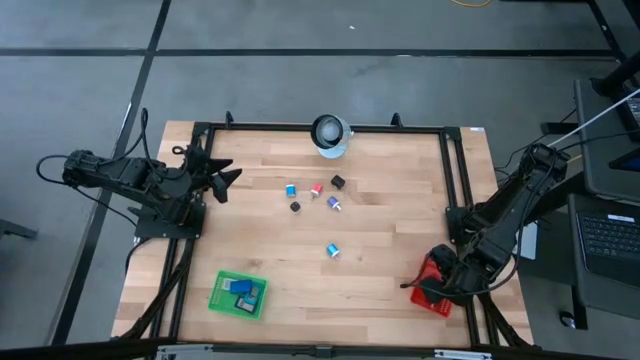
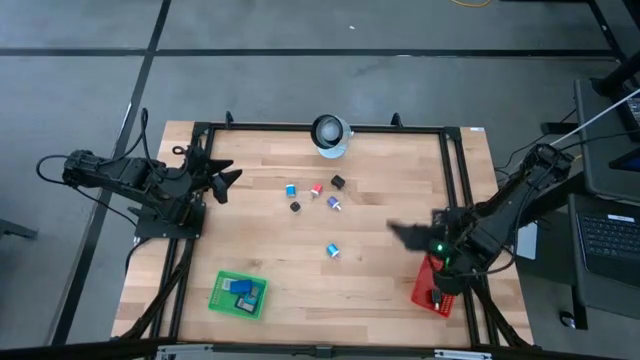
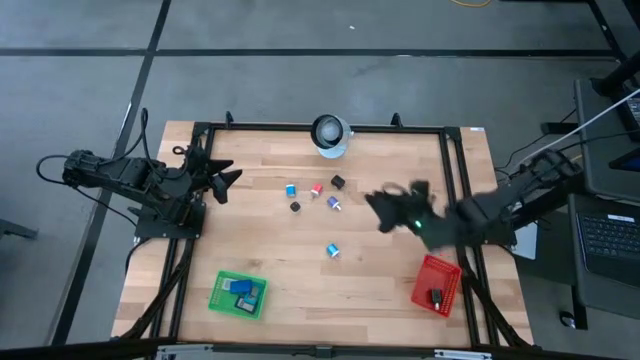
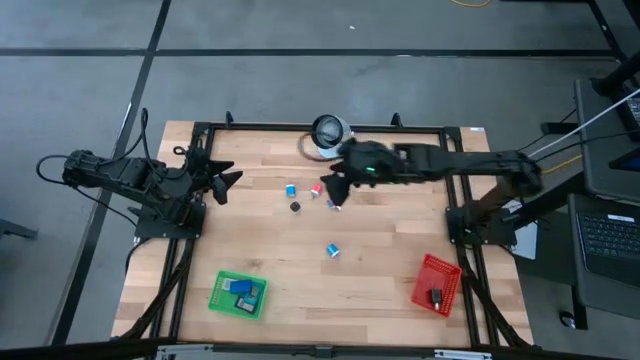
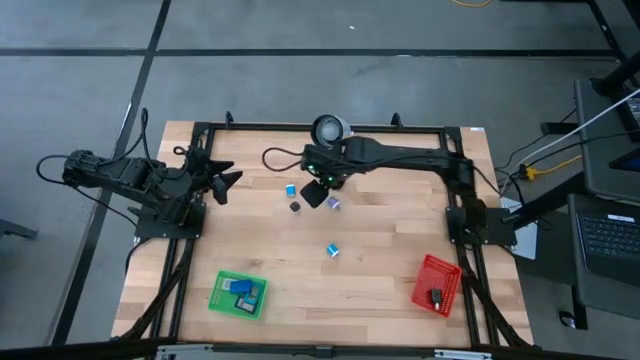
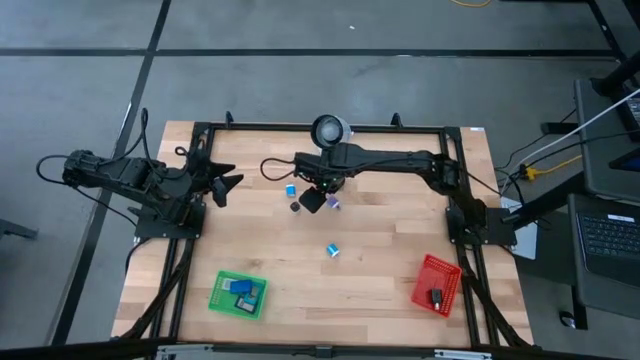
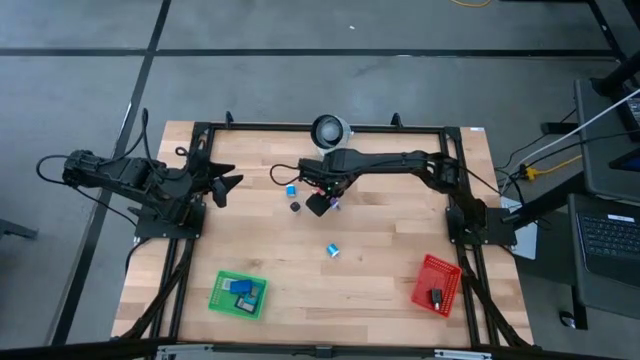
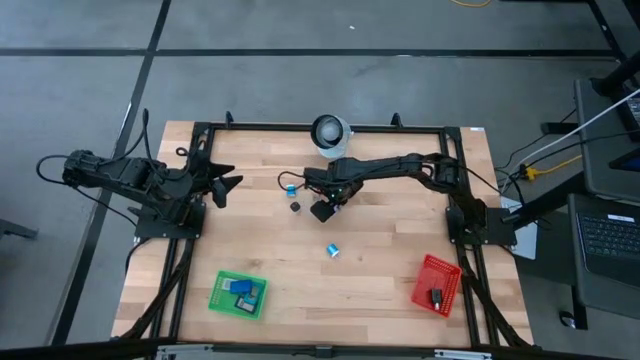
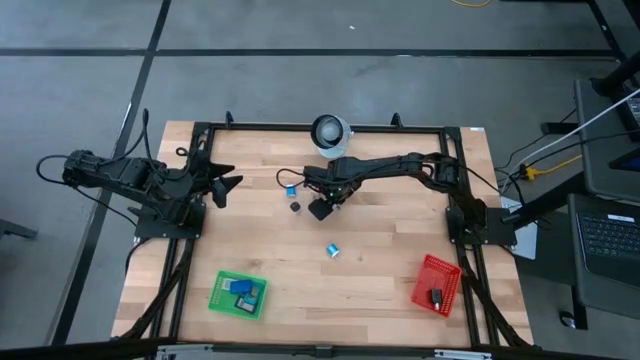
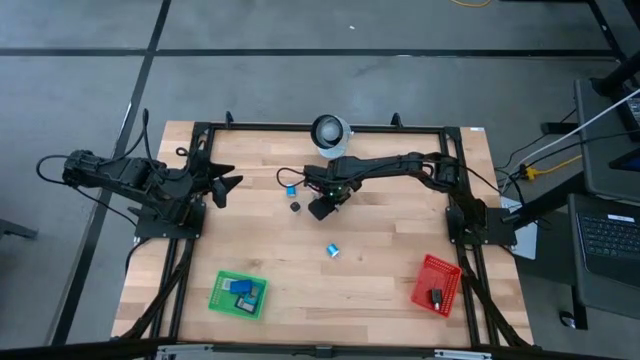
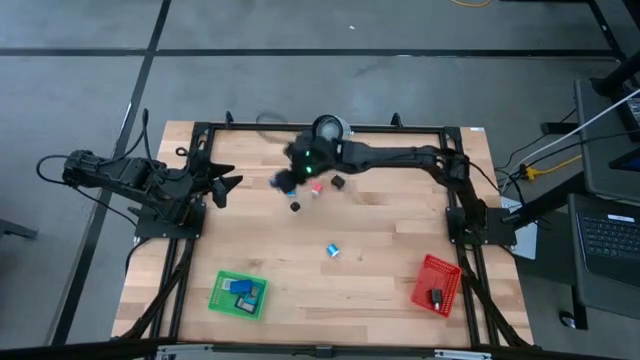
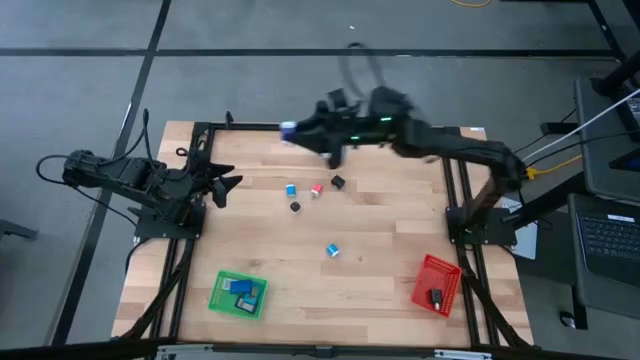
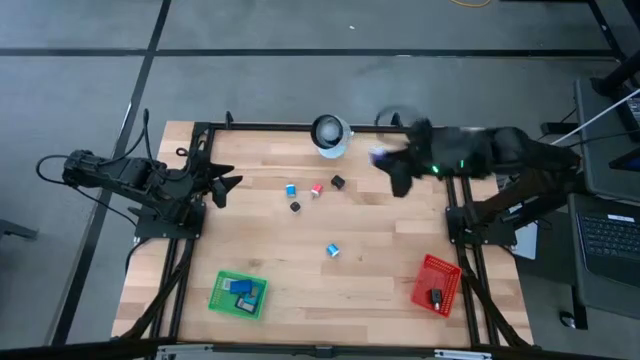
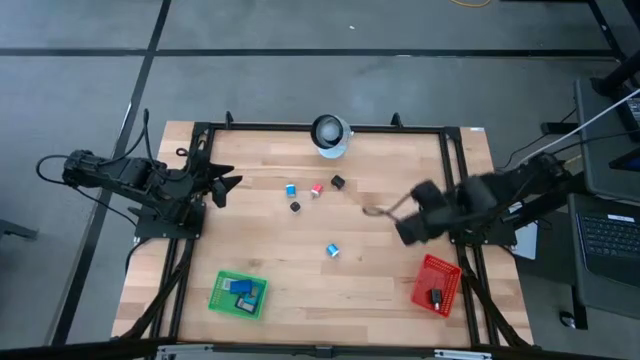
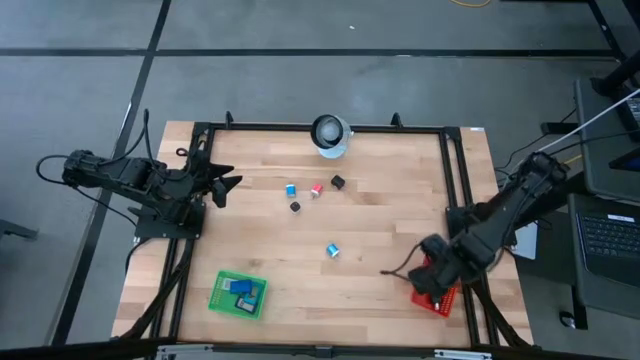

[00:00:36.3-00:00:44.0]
Task: Pick & Place Office items
Put the purple charger adapter into the red bin

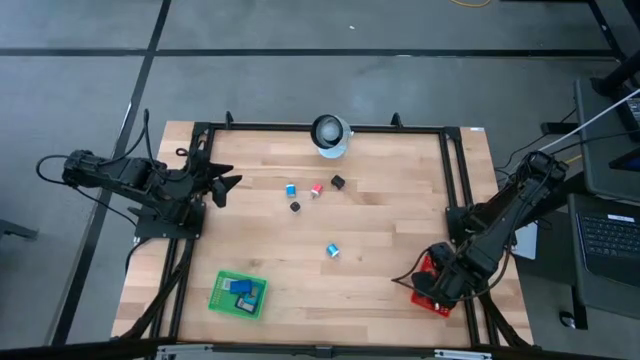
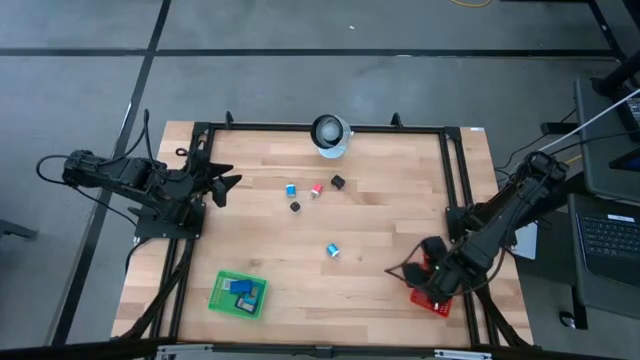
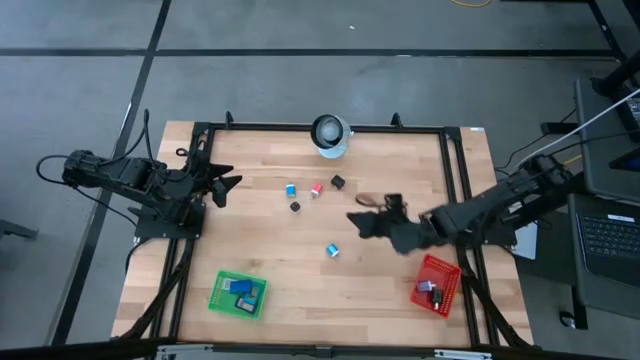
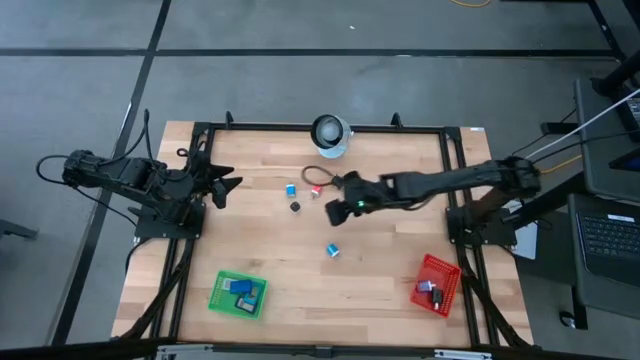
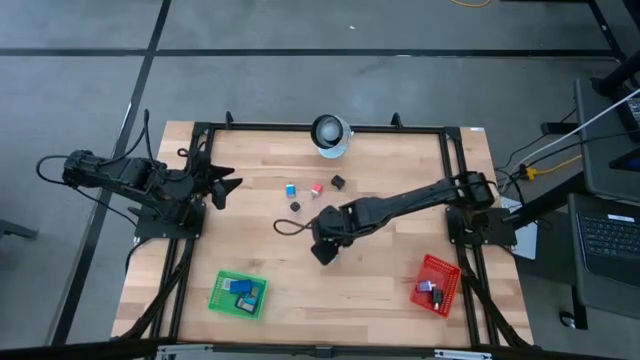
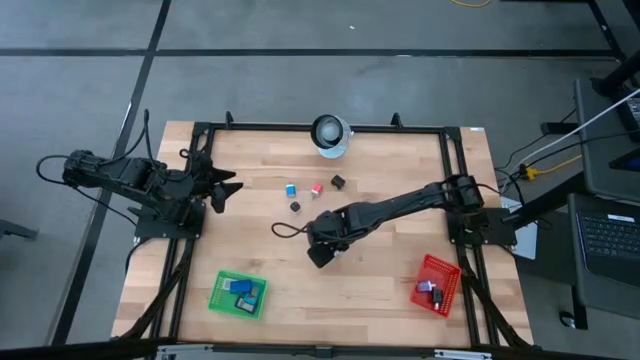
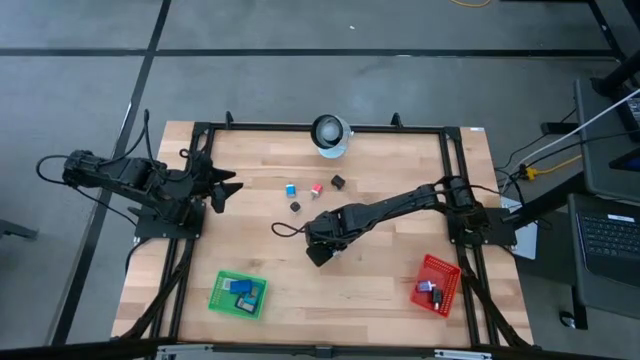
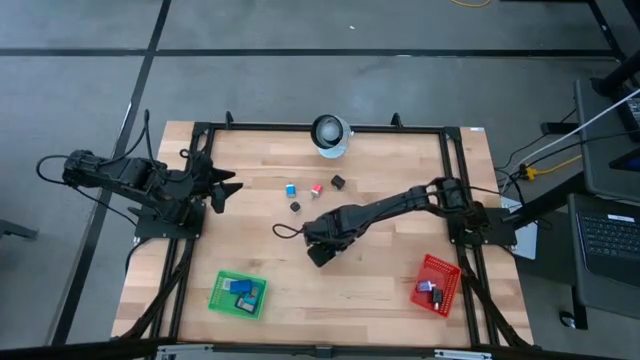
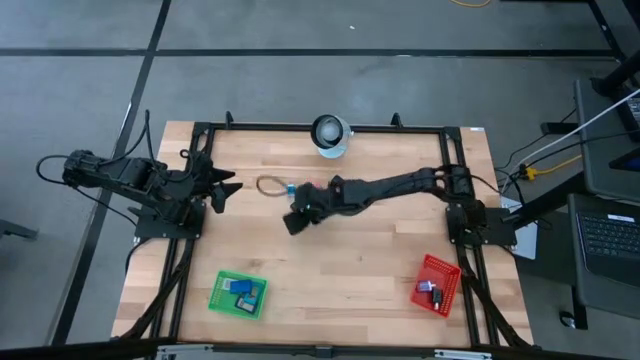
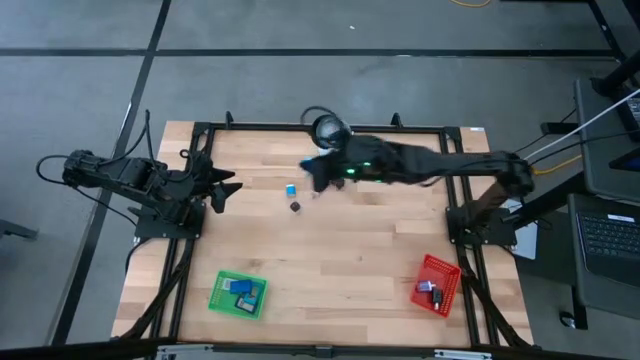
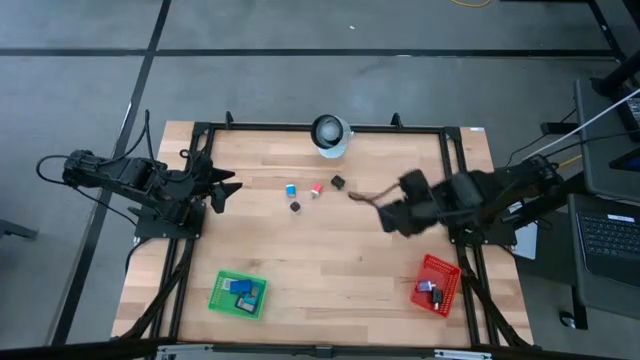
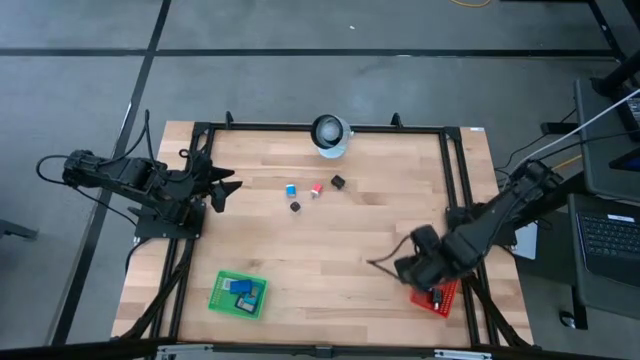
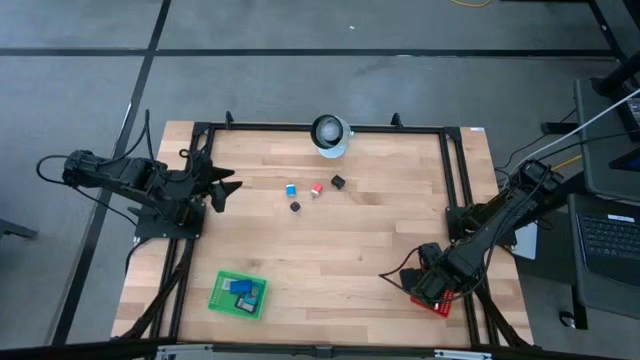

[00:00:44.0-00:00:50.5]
Put the bottom light blue charger adapter into the red bin

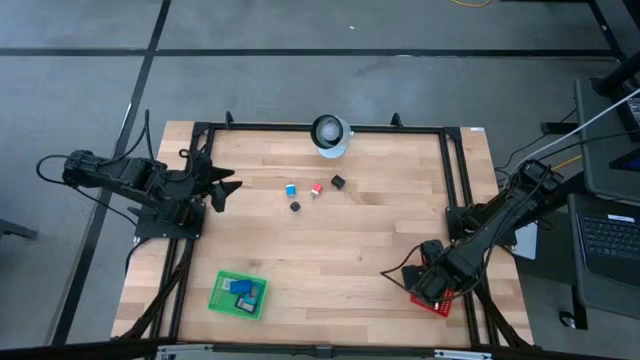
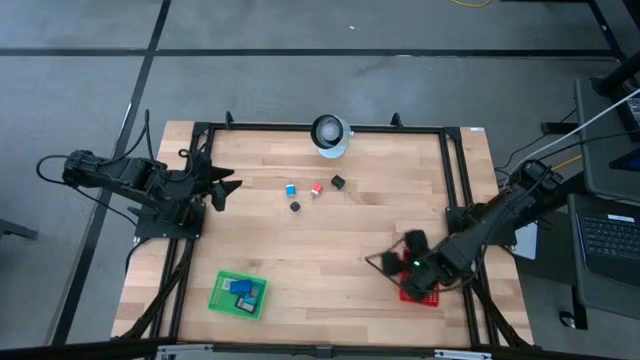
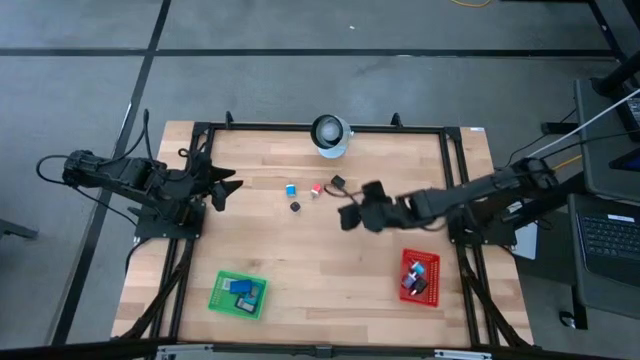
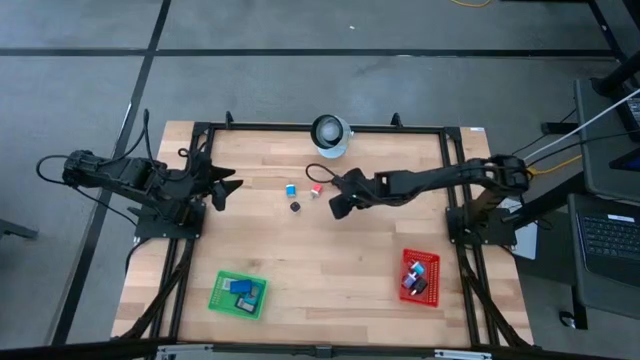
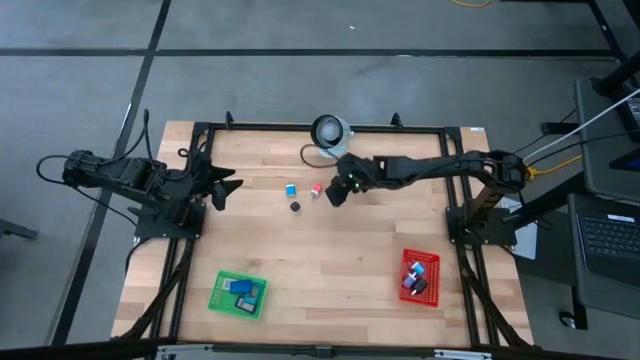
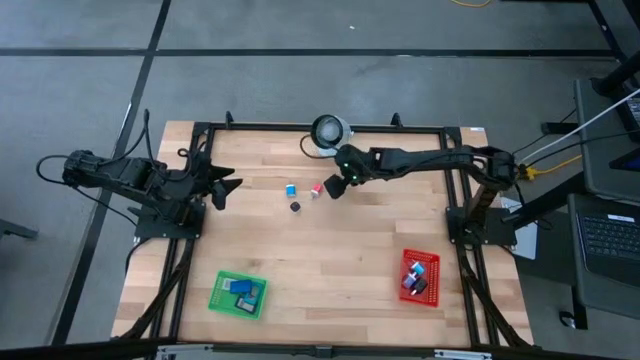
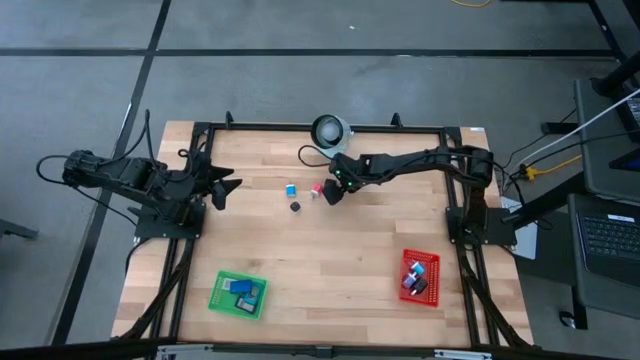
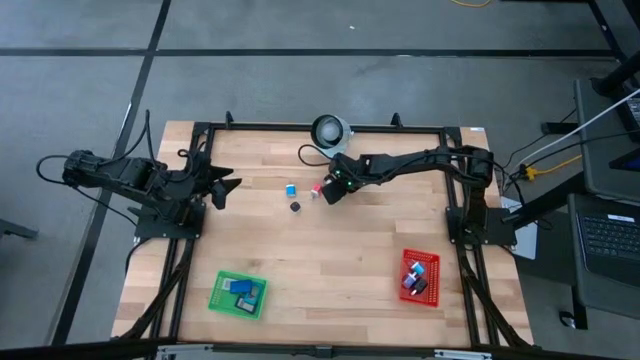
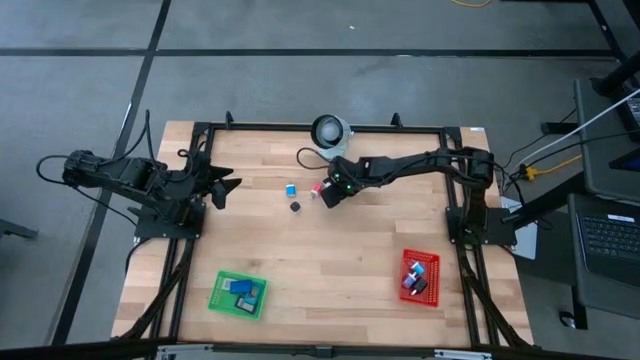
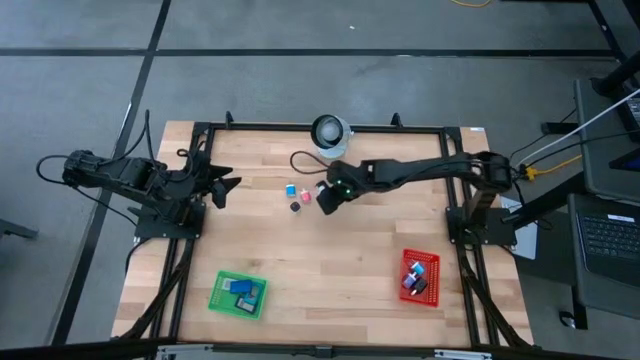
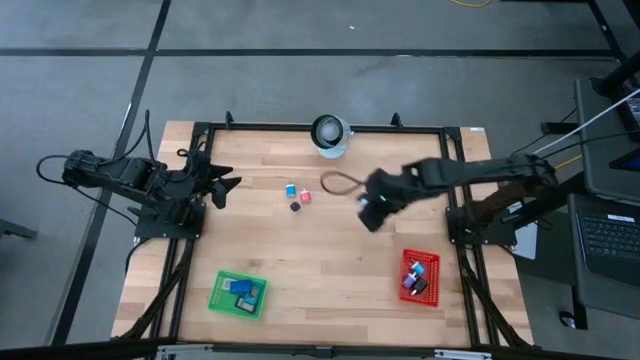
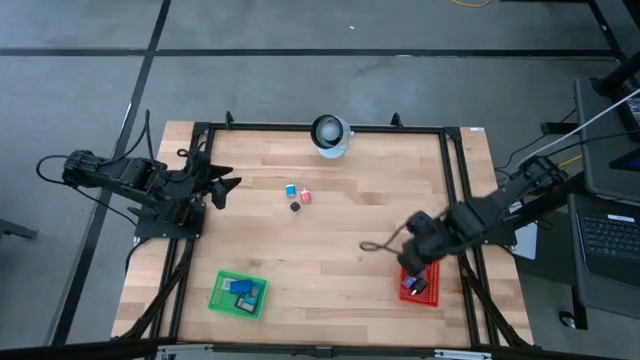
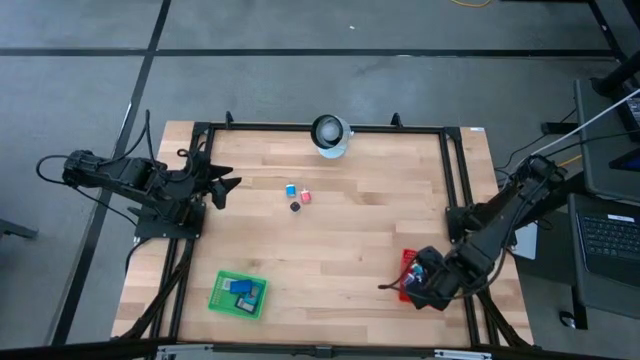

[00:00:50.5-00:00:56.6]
Put the black charger adapter into the red bin
